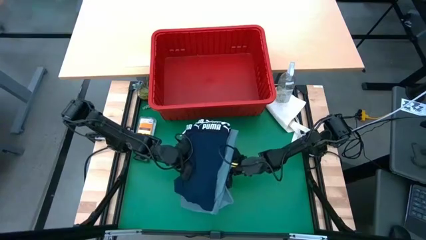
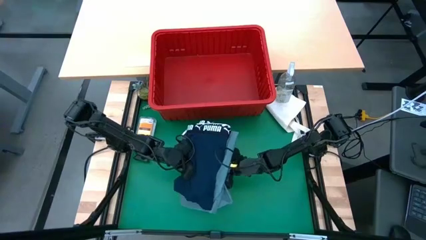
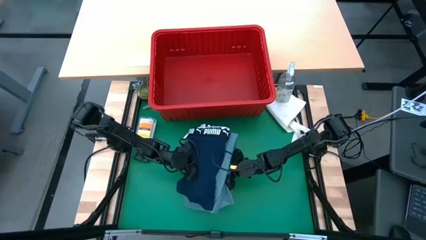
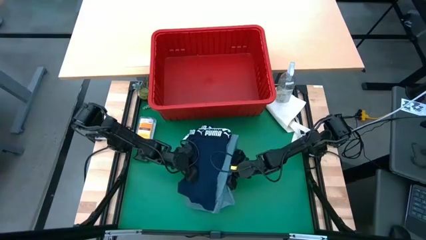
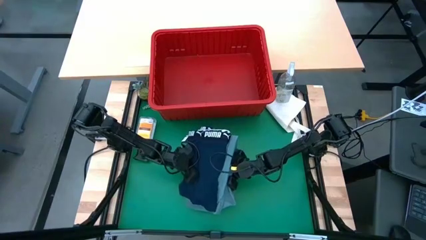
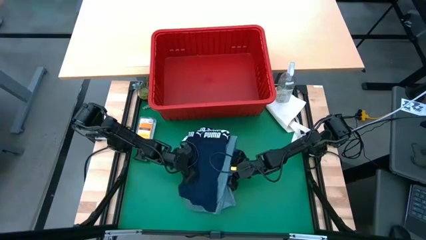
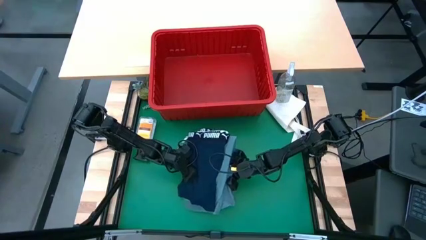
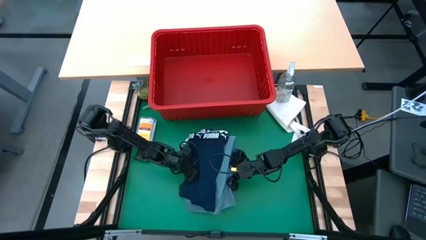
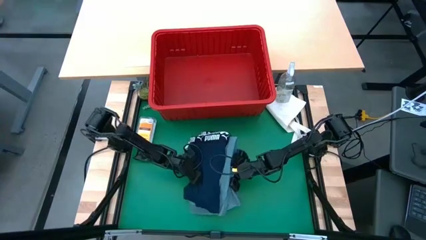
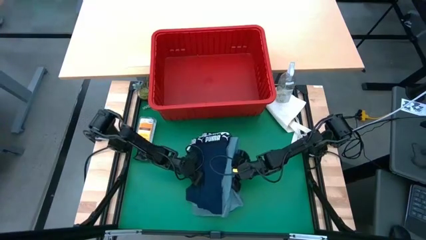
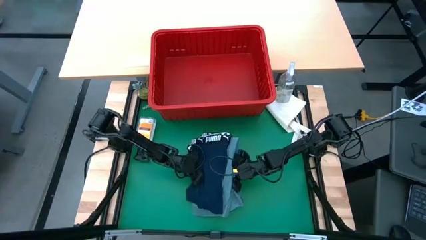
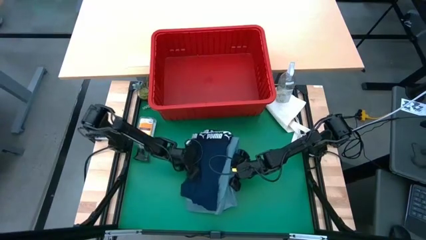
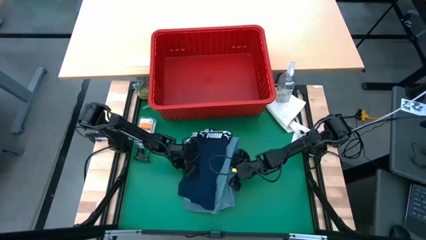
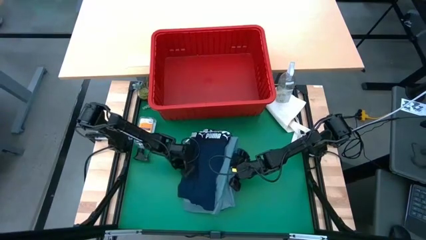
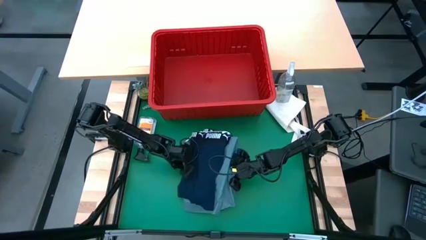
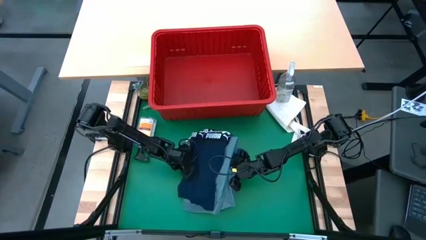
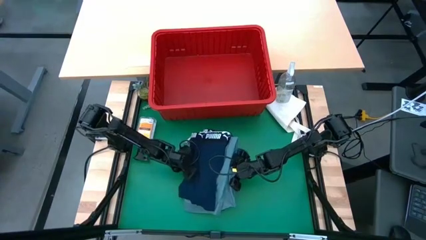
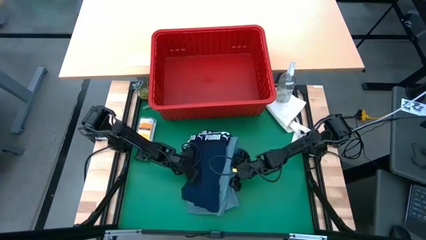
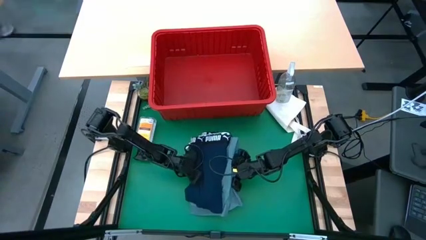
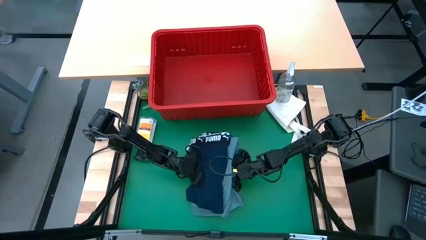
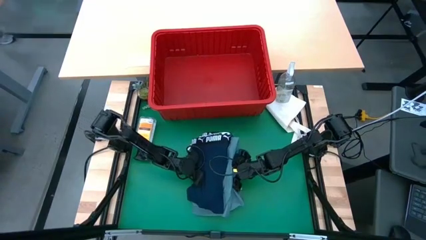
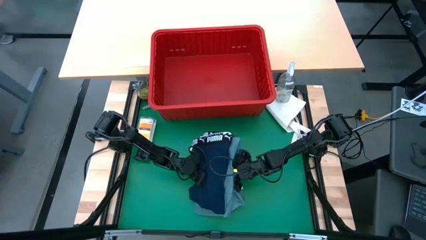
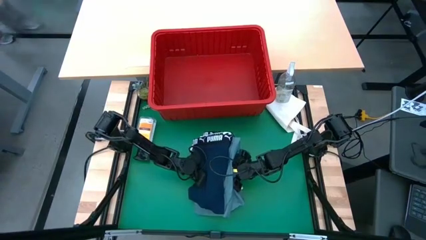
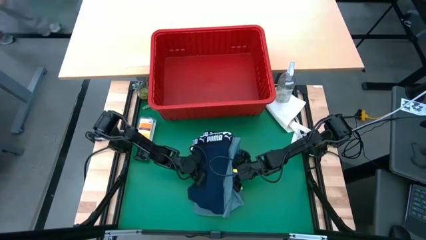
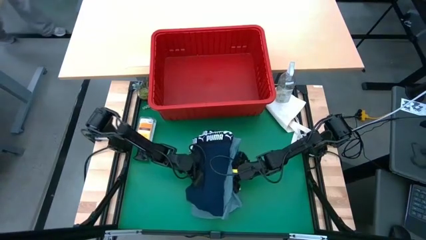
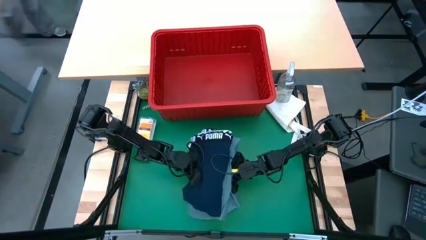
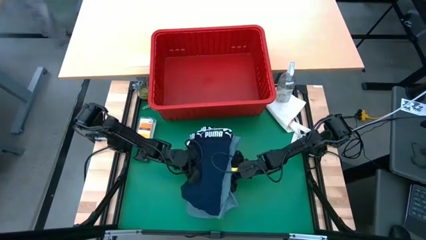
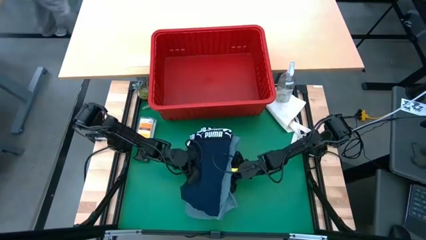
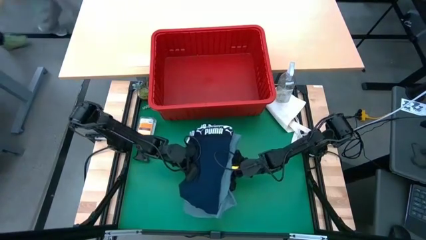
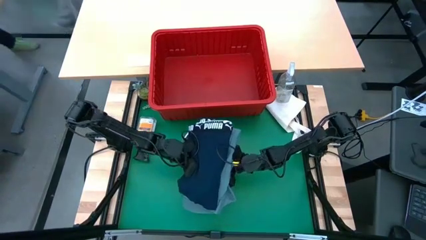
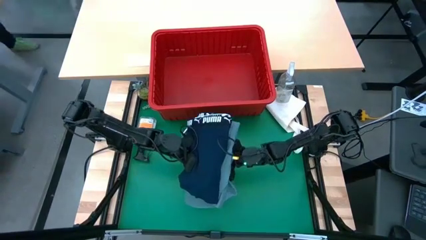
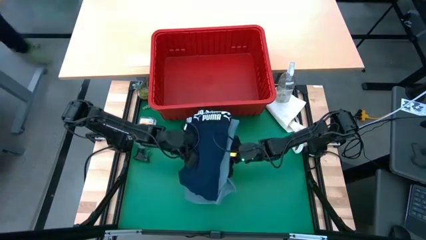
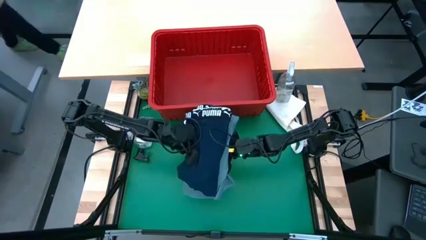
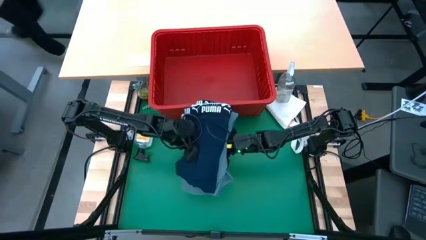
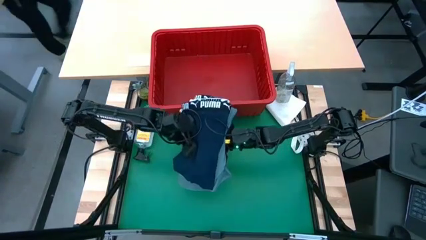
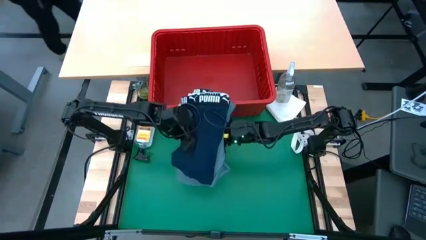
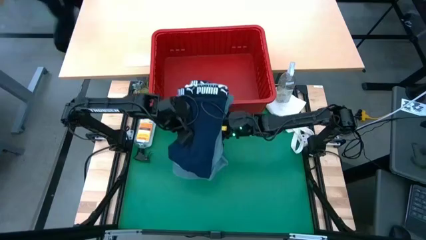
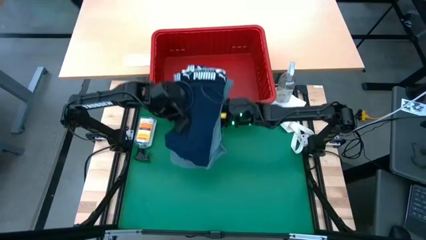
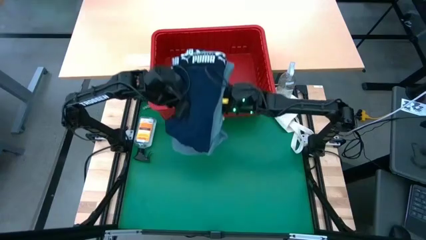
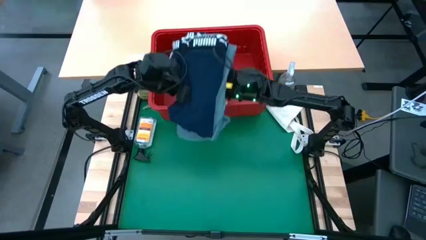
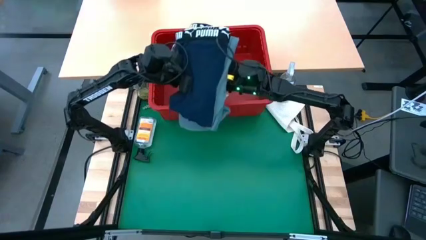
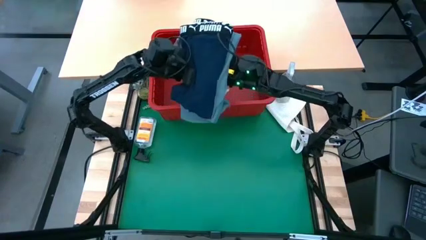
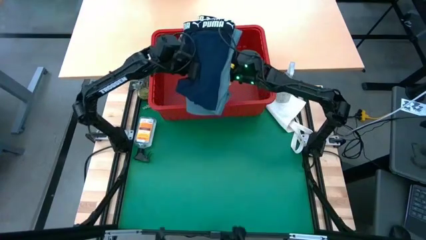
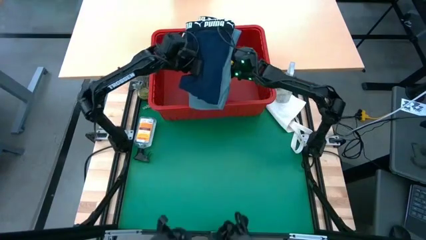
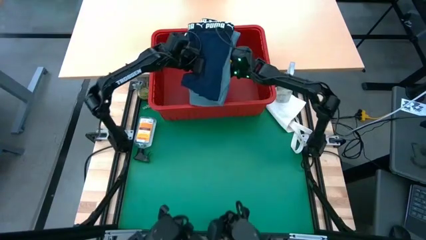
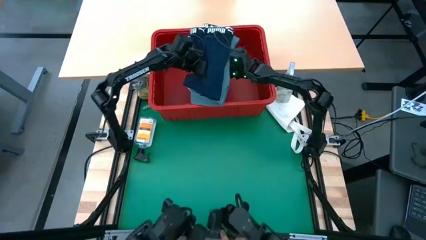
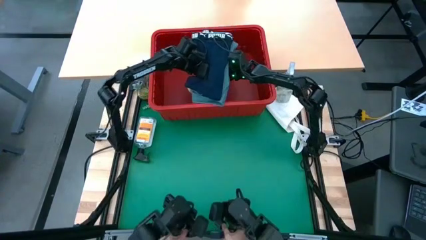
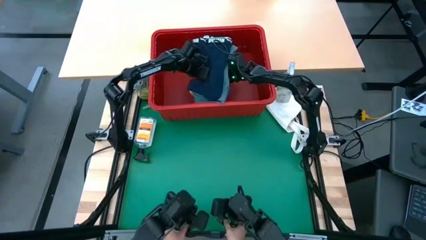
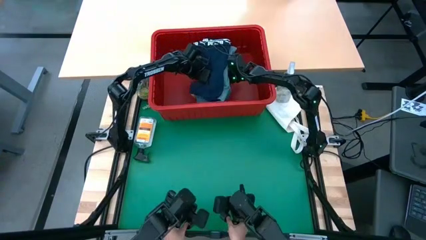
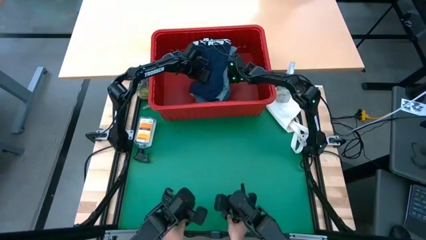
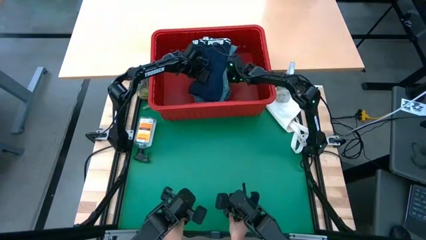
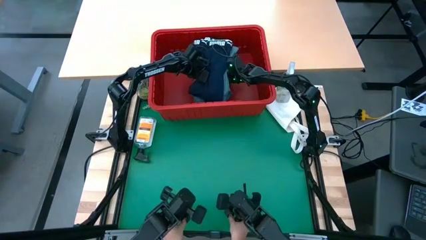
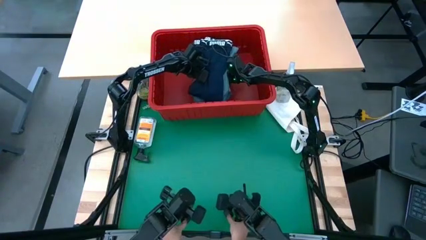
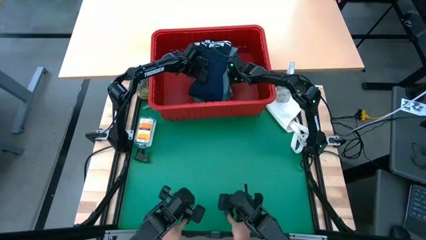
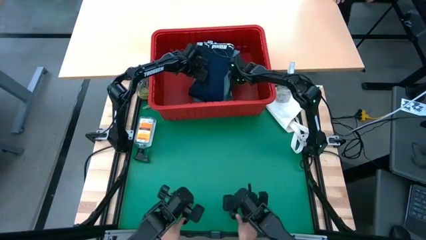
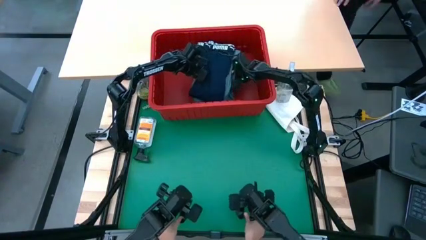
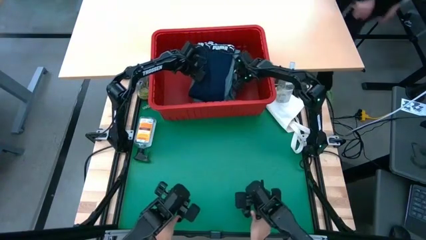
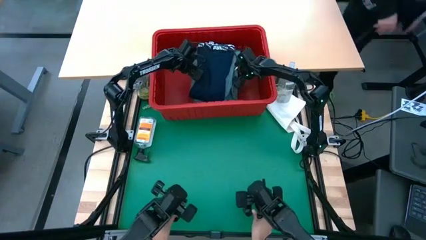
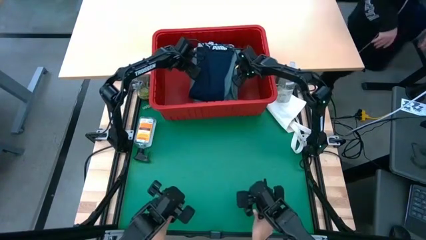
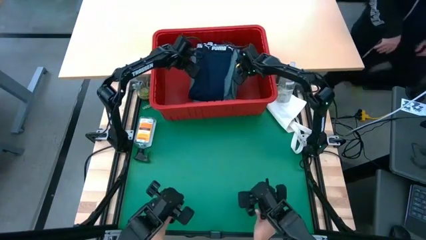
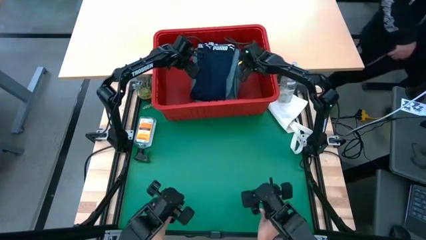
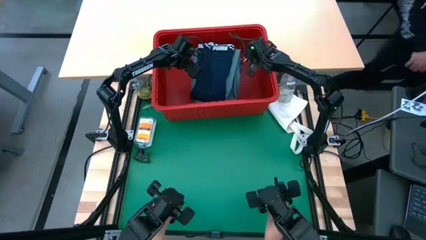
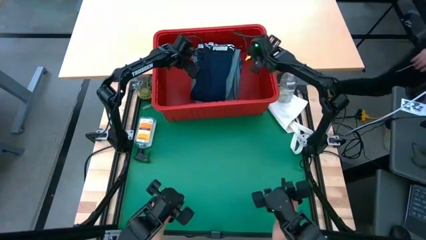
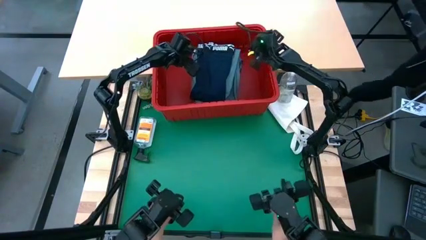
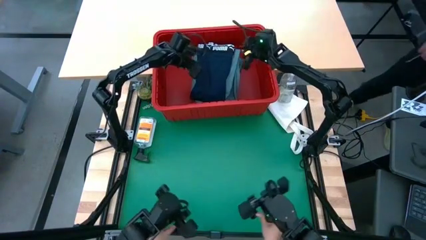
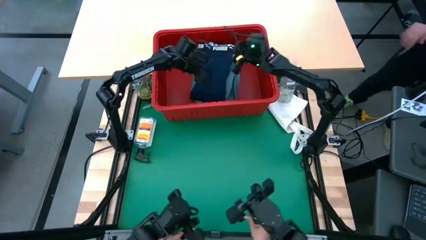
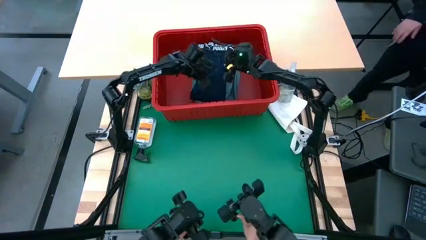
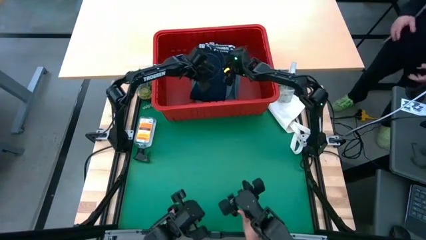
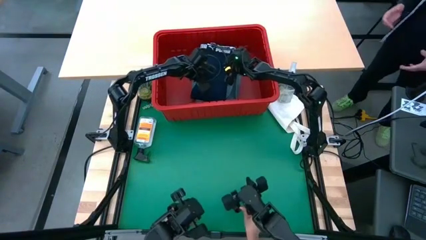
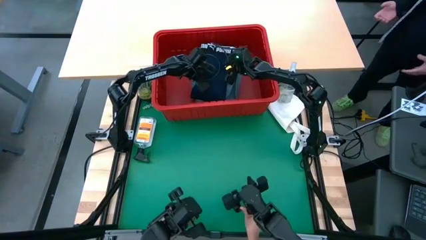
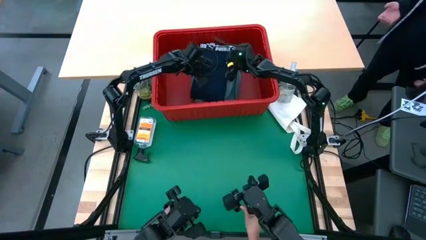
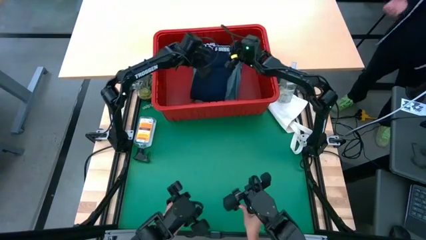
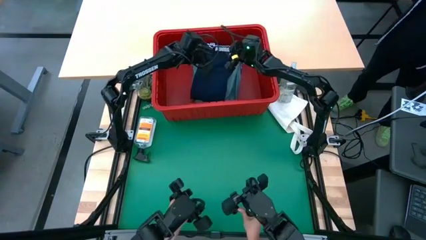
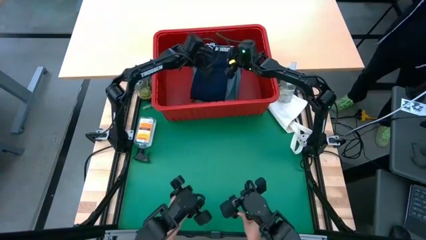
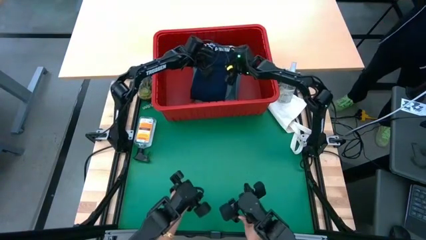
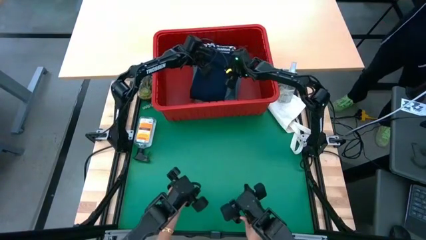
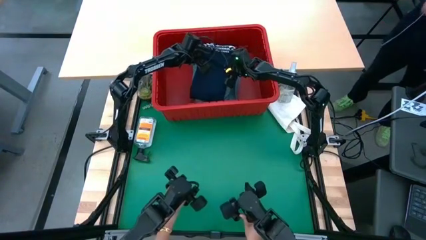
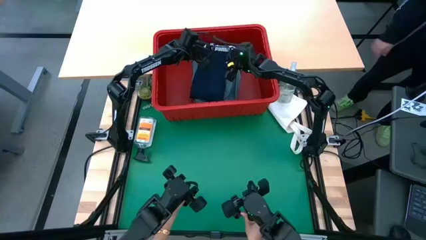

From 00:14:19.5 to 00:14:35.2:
Task: Fold Laundry from Bin
Put the stacked laundry into the red bin
